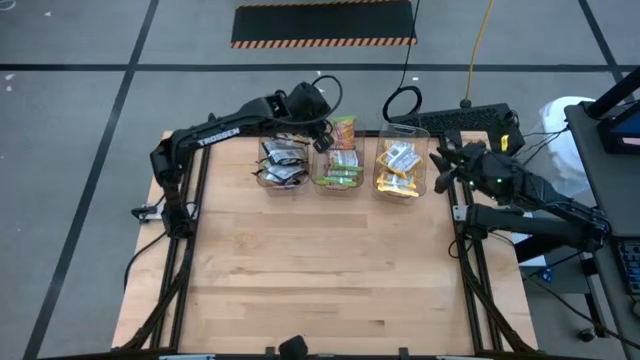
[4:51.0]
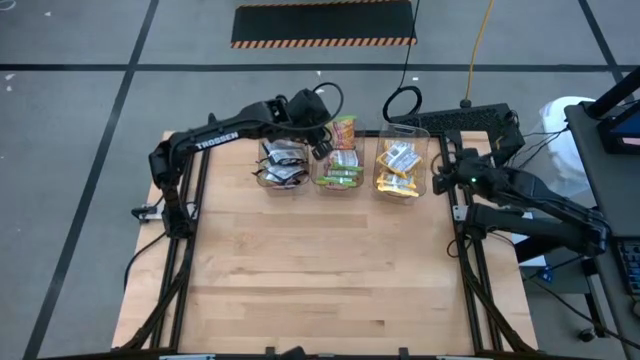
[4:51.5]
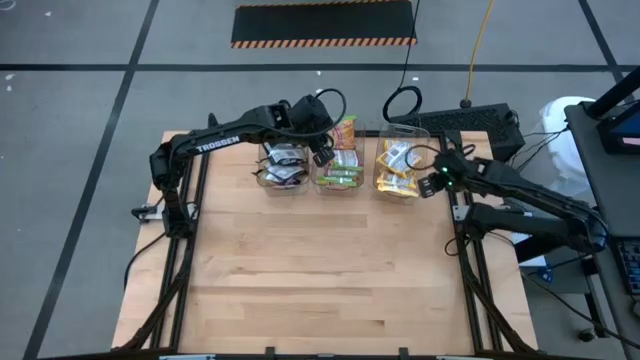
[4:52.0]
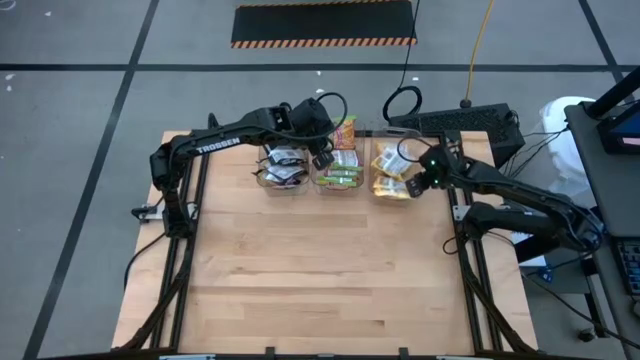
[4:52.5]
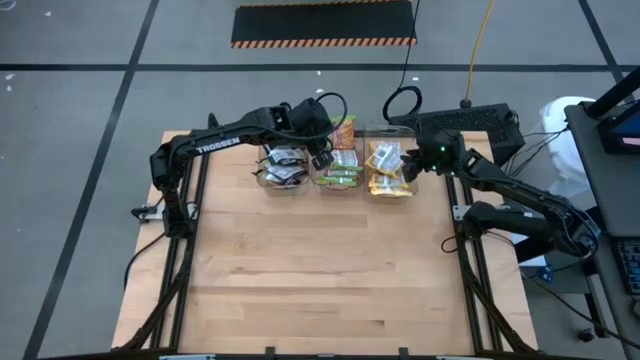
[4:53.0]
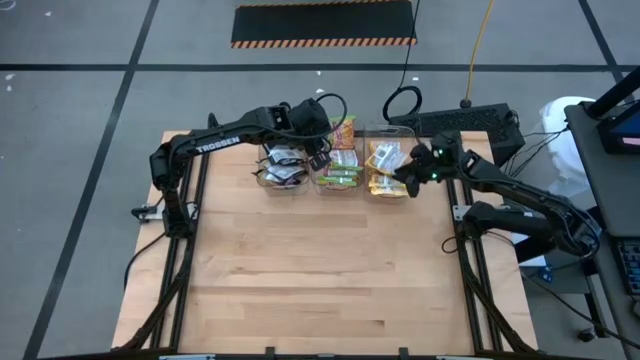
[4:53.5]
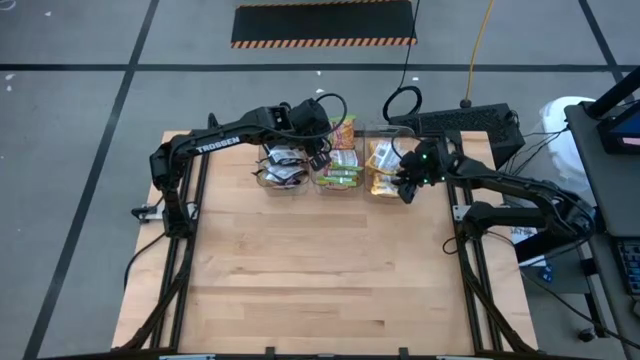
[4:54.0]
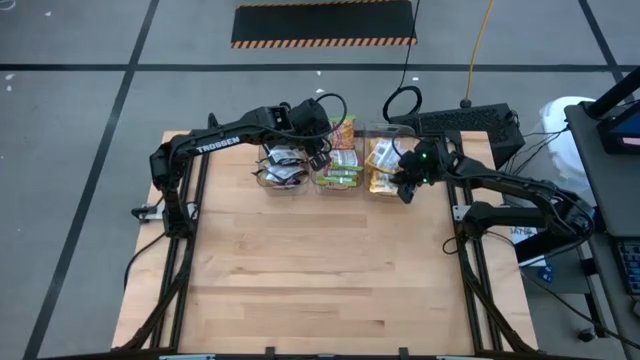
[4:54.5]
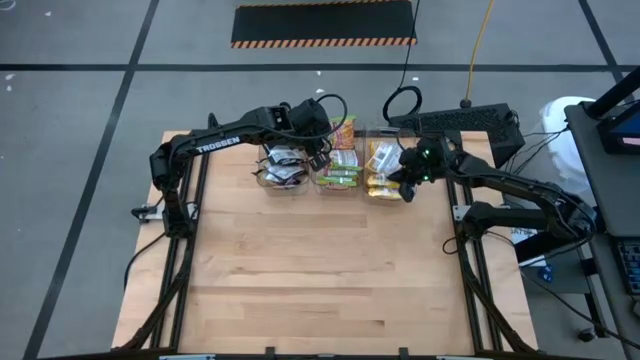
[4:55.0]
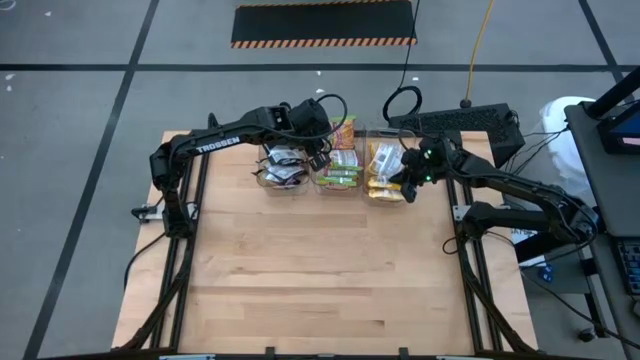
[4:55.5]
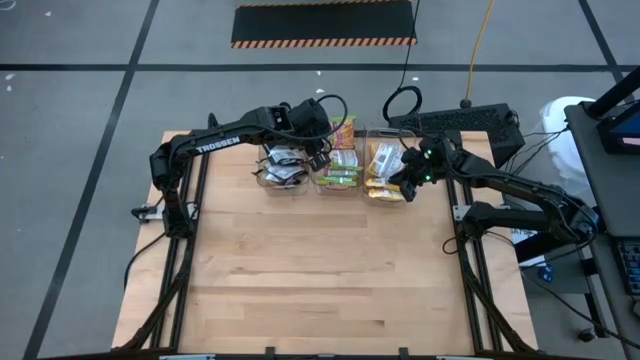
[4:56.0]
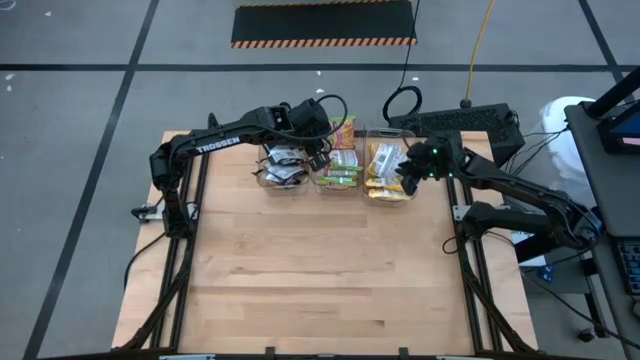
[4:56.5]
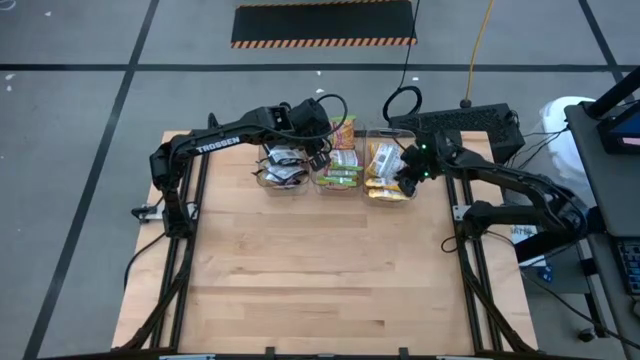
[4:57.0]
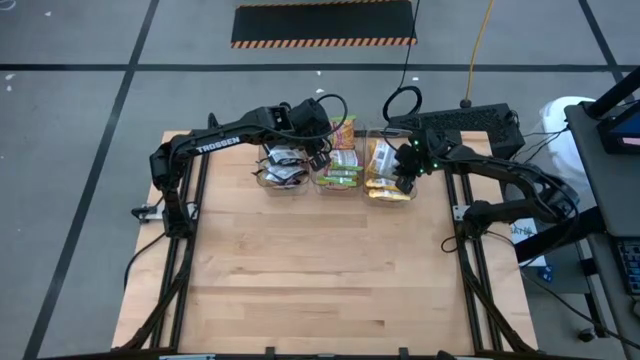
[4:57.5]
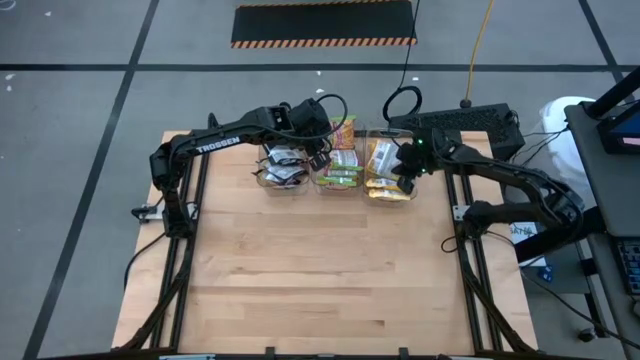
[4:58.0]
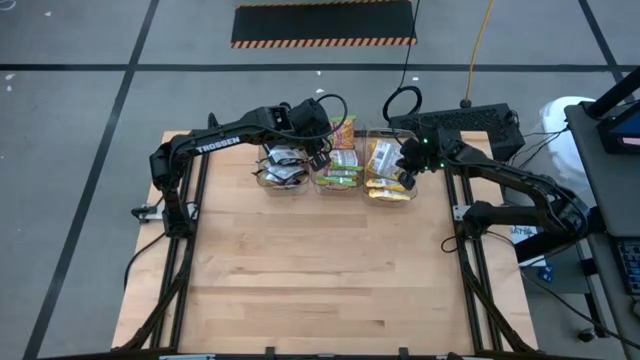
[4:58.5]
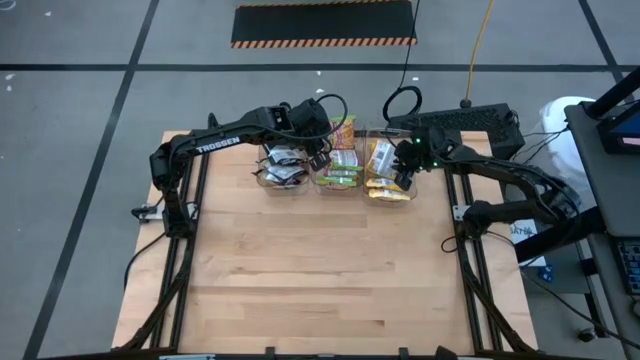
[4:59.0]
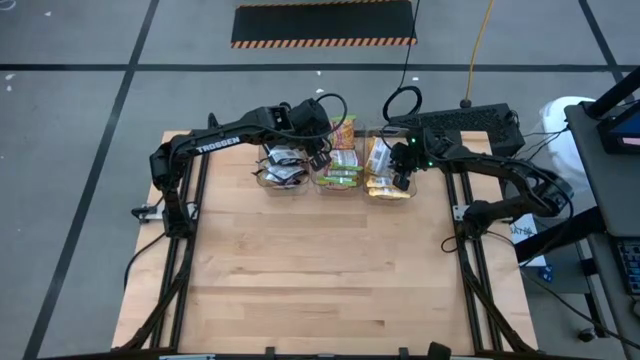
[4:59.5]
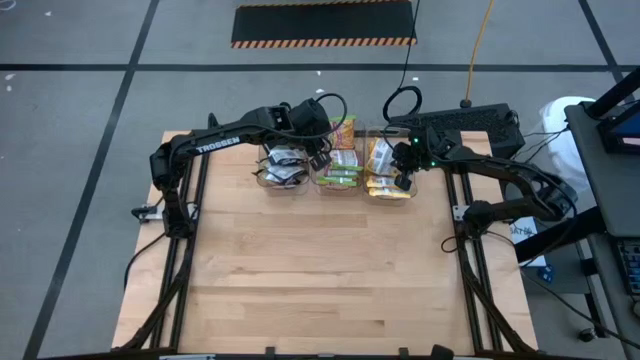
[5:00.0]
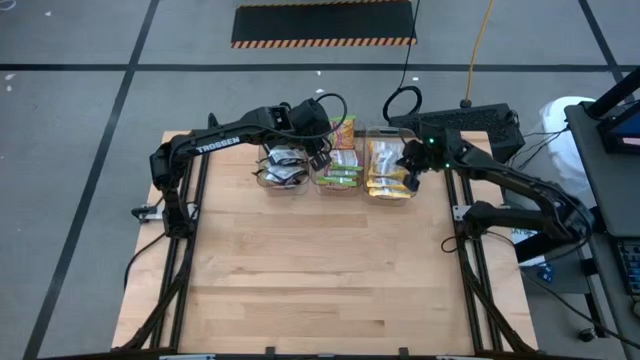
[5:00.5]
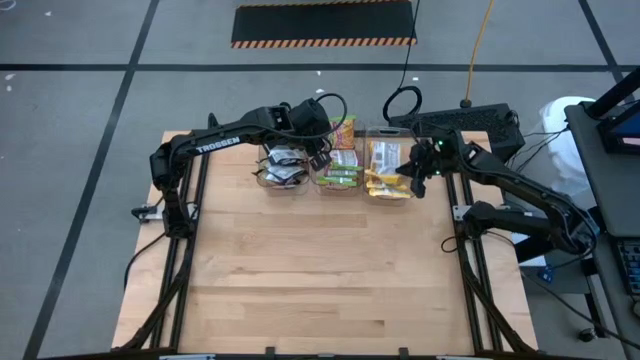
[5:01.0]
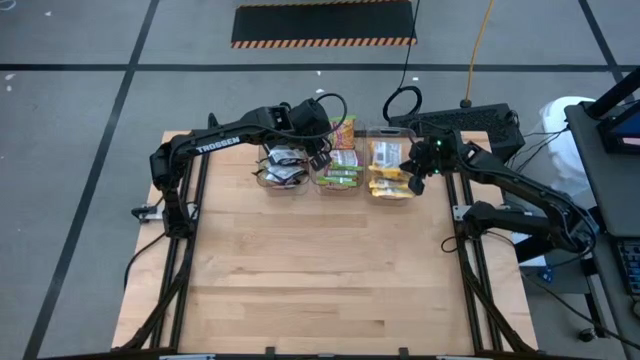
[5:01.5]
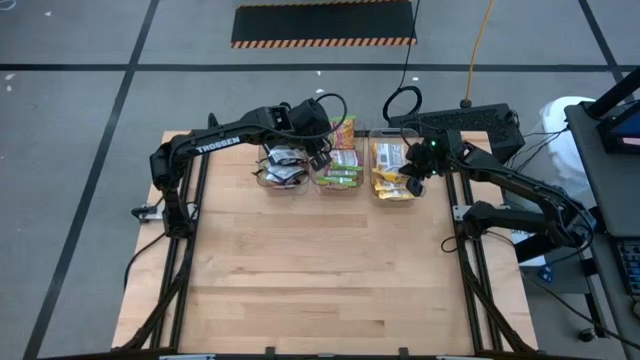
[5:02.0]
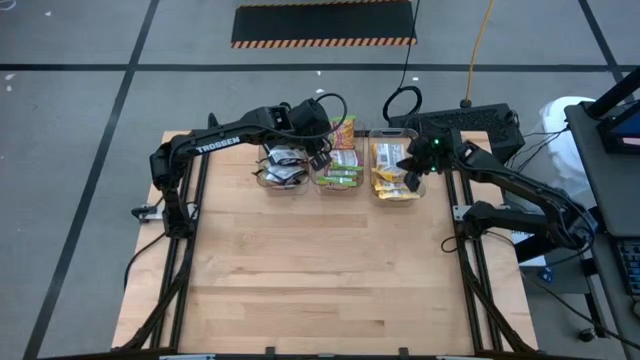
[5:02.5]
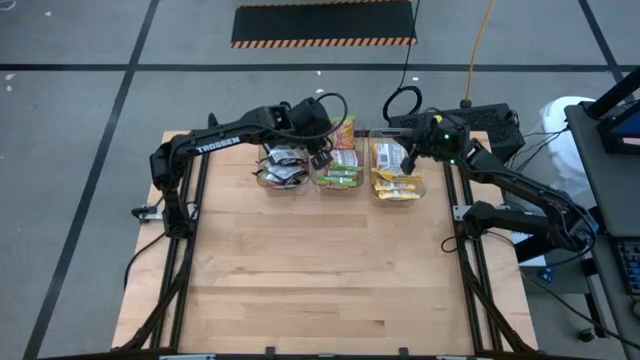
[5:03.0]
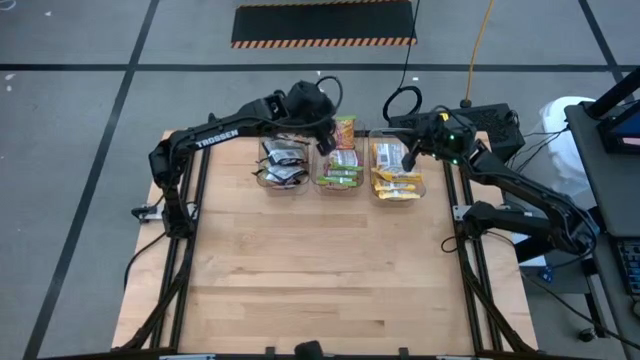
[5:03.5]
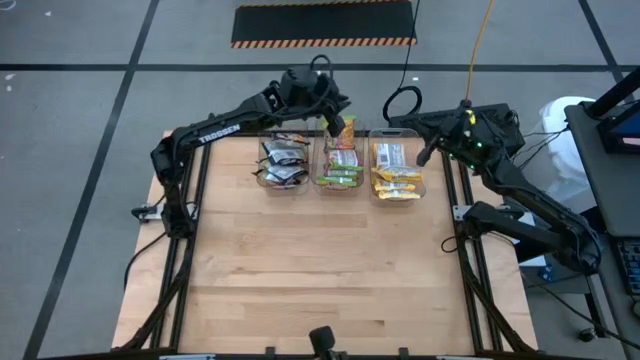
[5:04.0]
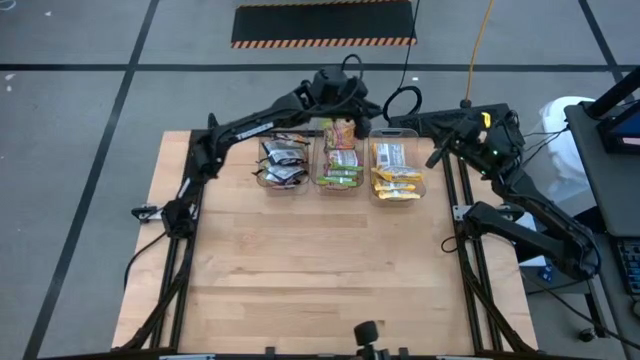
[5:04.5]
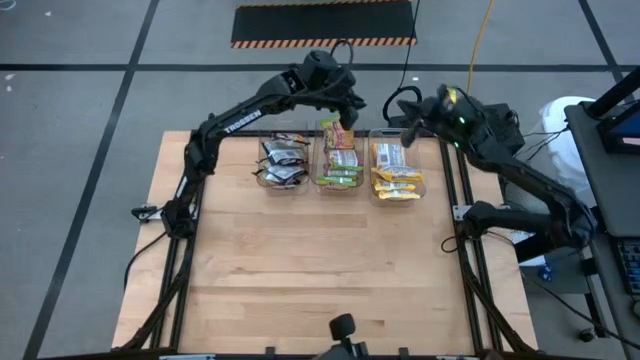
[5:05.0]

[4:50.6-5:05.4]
Task: Sort Maruchan noodles
Adjust the yellow noodle packs in the right transparent bin
